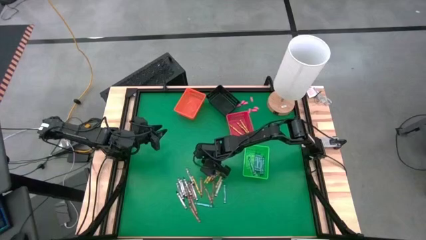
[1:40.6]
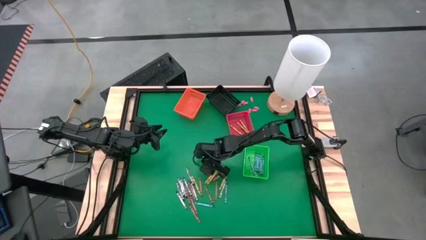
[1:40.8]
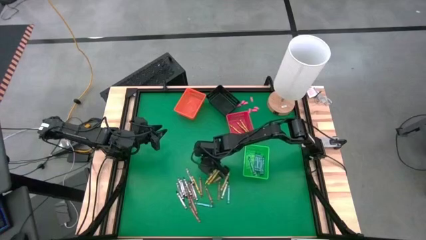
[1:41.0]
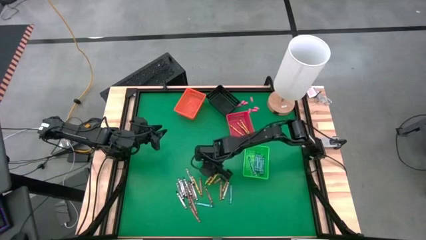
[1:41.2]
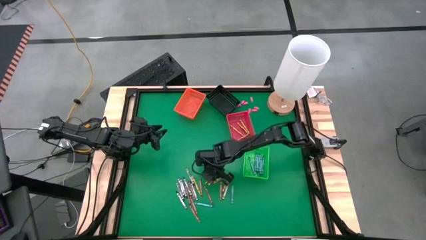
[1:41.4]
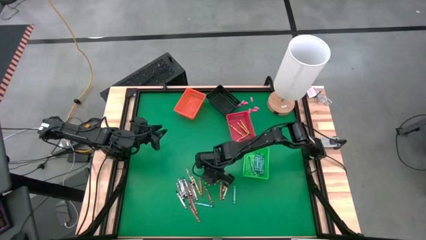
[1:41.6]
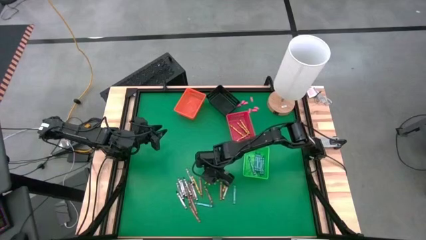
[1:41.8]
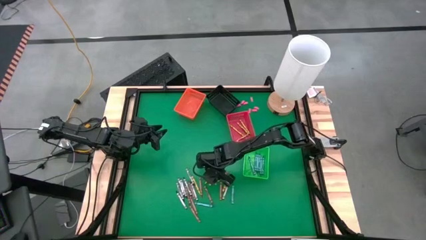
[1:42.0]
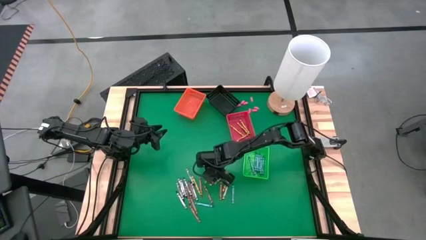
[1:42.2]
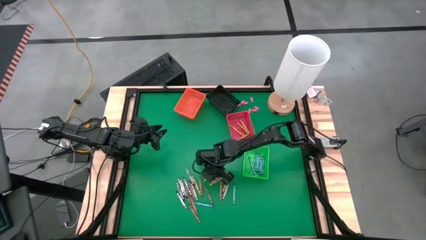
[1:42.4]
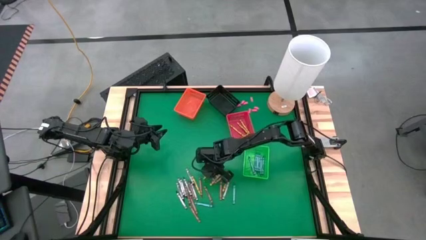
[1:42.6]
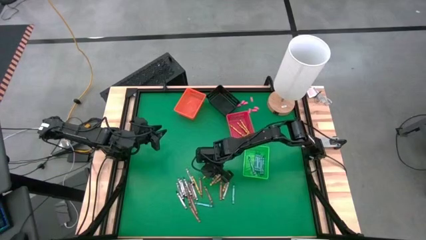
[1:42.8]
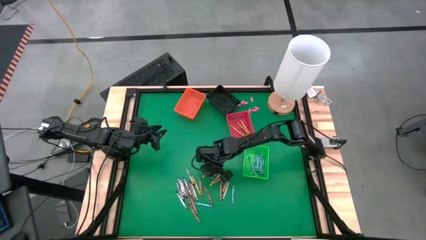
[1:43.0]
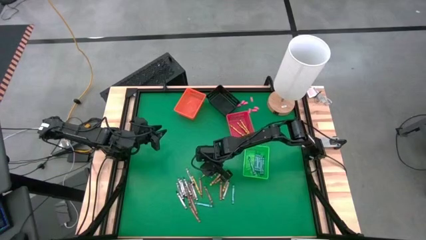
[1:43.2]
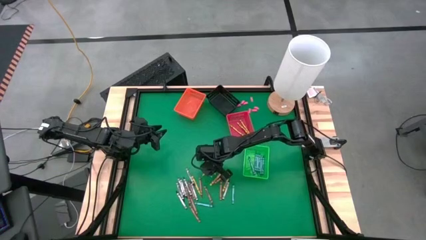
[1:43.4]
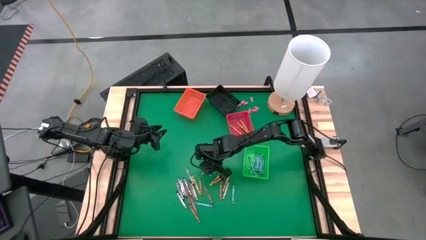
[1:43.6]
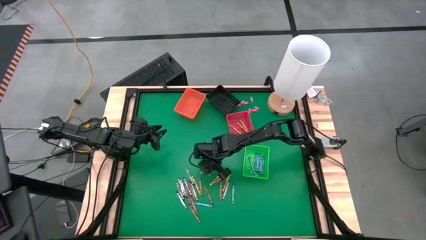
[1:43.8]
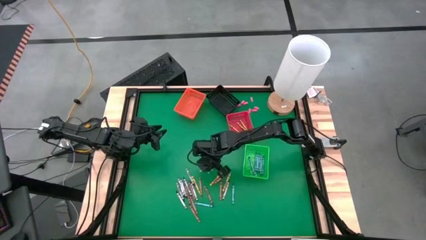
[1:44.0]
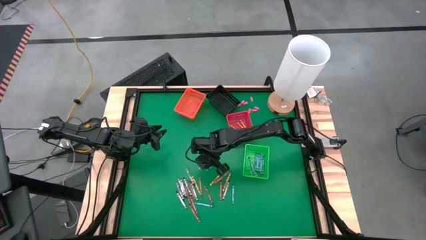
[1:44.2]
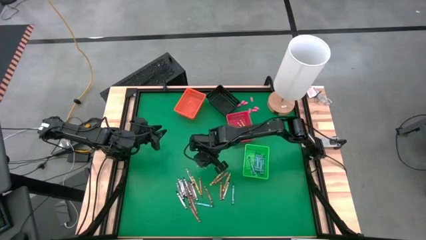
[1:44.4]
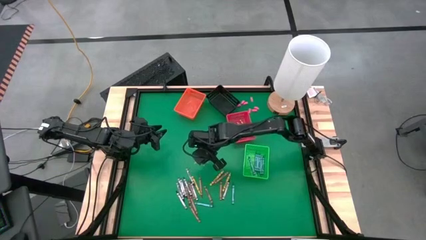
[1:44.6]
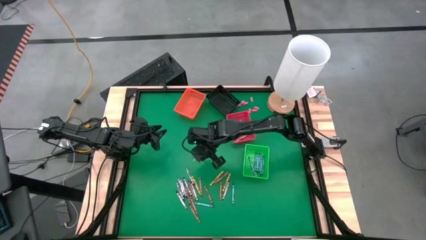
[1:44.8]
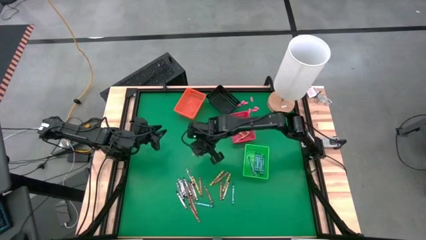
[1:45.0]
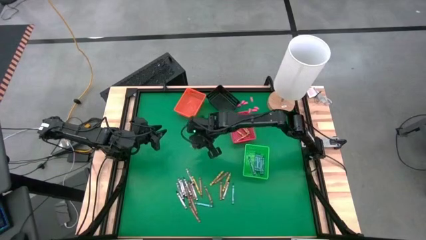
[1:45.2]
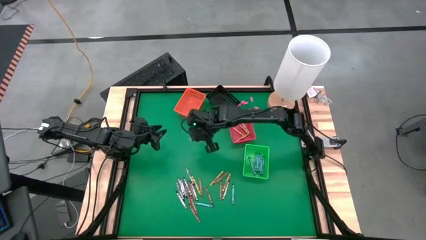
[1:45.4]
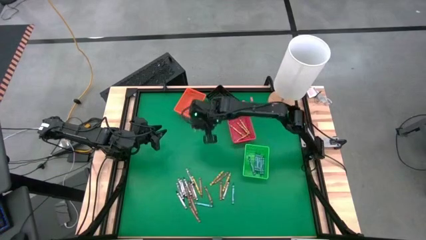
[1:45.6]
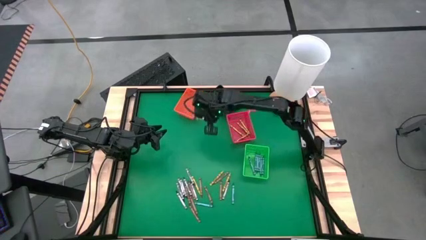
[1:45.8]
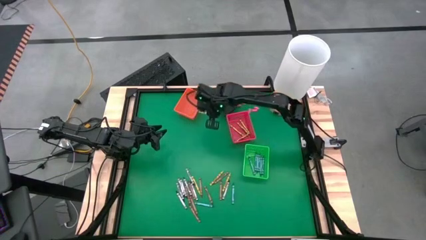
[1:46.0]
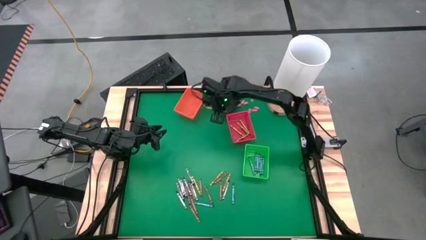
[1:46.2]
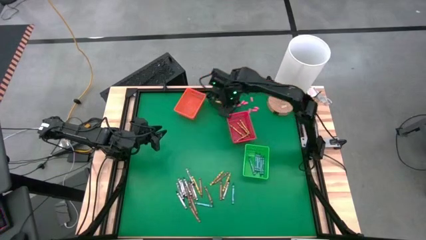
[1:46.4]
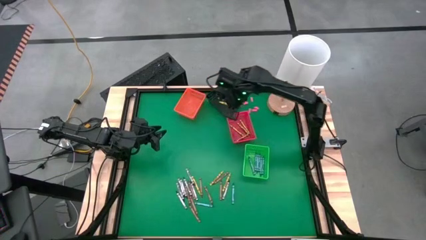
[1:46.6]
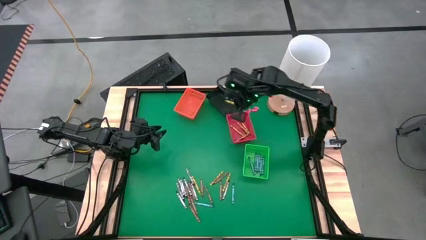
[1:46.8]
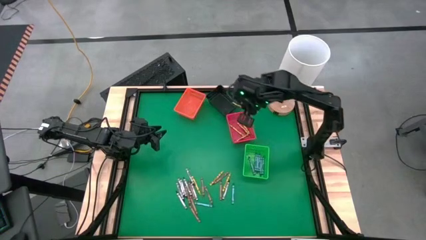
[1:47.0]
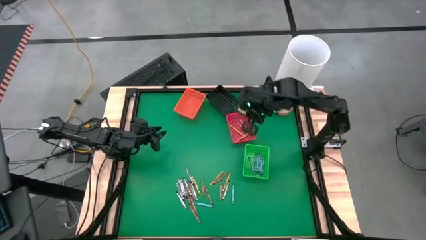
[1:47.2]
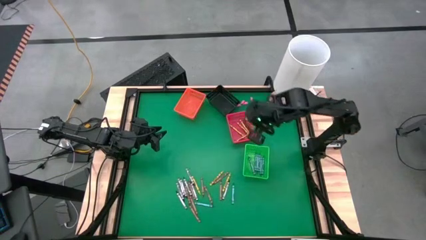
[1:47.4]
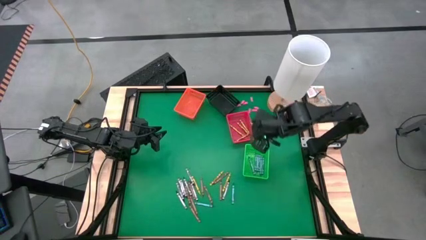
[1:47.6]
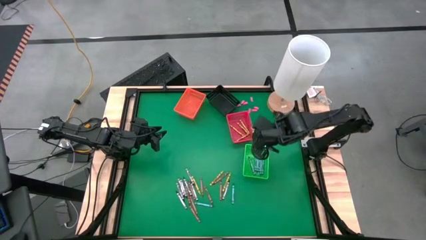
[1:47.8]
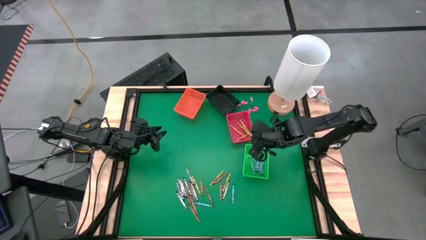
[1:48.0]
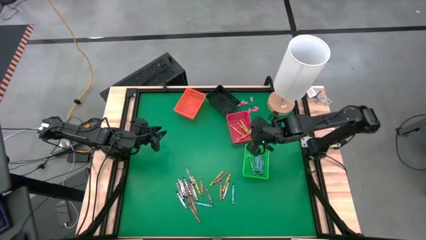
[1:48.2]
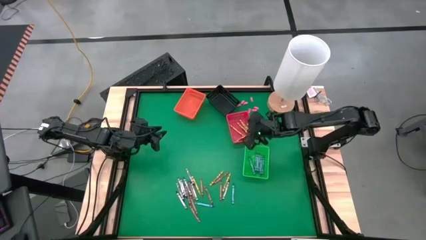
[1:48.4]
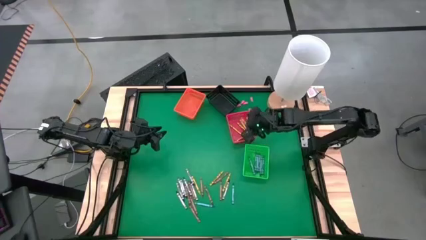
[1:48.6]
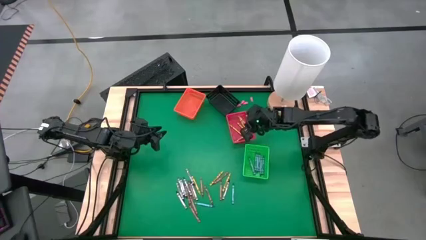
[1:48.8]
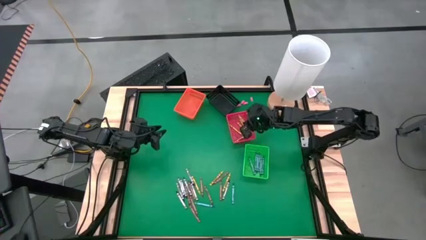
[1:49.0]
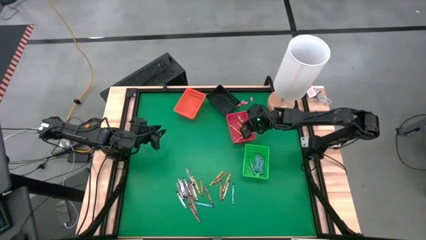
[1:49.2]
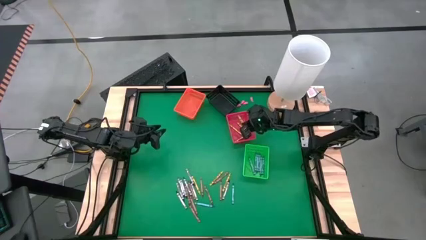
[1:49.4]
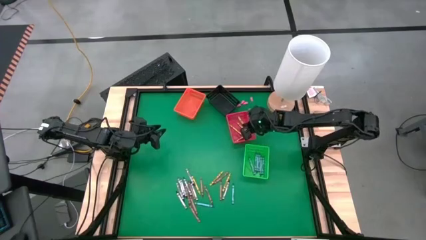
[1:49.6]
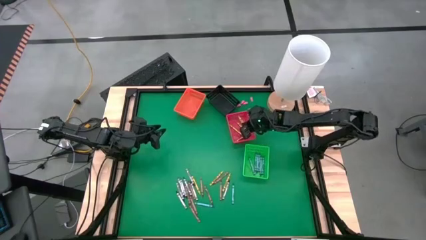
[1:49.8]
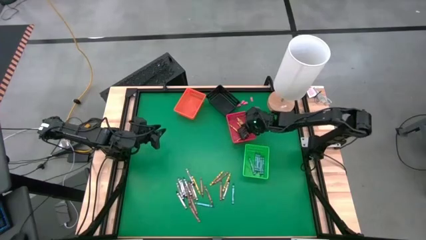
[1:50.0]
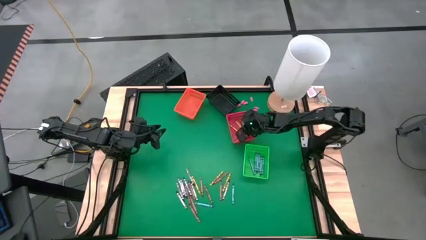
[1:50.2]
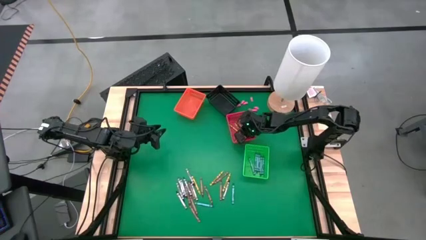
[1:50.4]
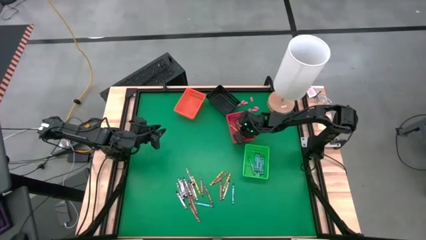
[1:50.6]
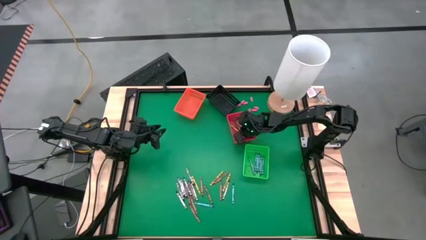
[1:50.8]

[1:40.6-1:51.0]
Task: Sort crayons
Put the yellow crayon into the red bin

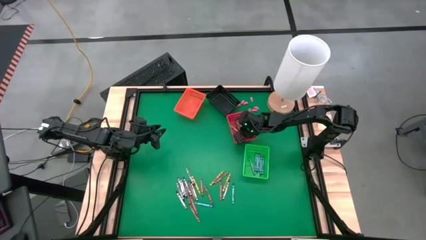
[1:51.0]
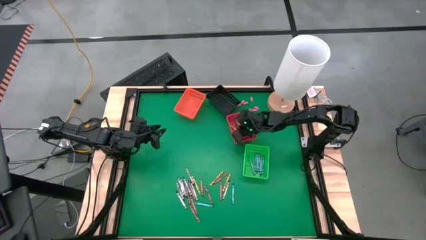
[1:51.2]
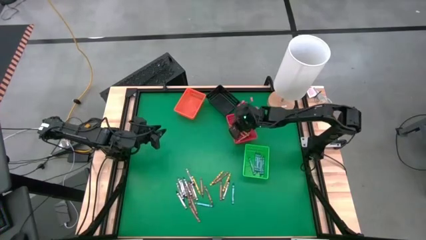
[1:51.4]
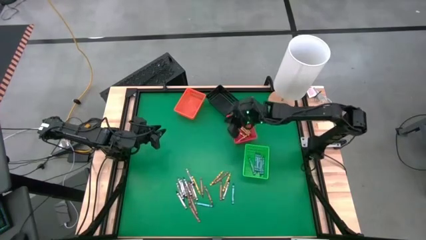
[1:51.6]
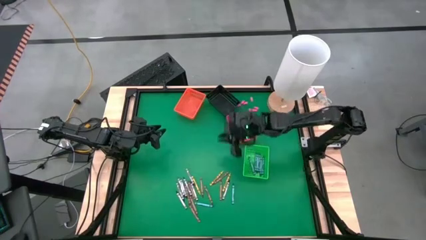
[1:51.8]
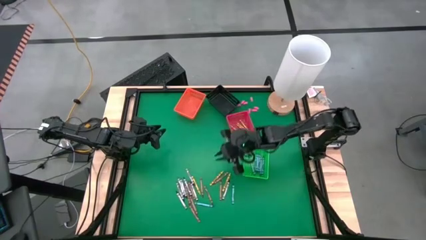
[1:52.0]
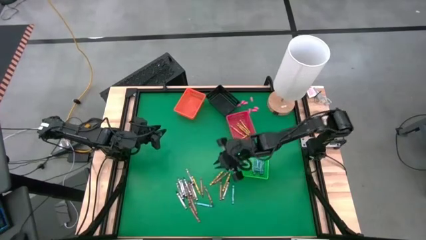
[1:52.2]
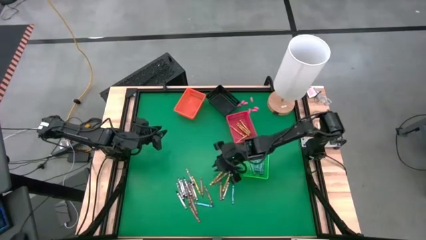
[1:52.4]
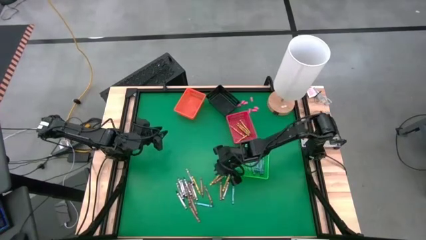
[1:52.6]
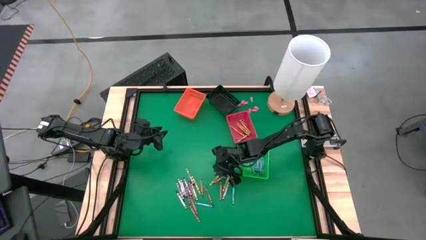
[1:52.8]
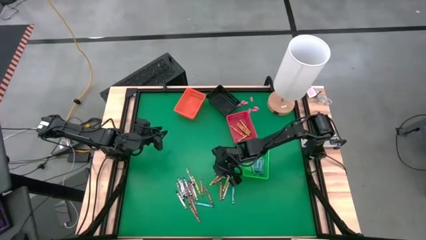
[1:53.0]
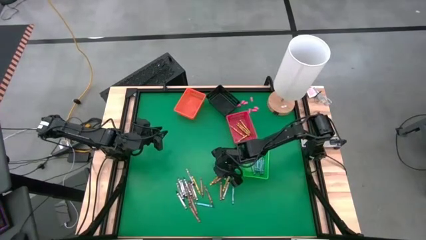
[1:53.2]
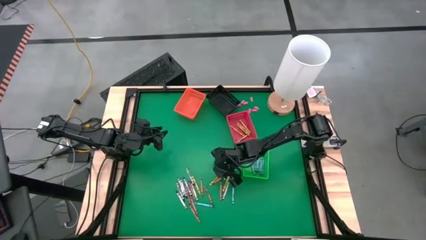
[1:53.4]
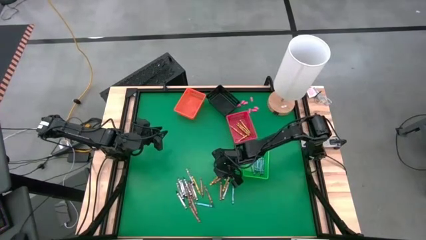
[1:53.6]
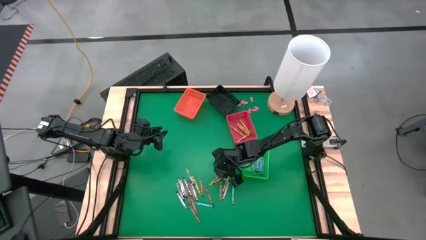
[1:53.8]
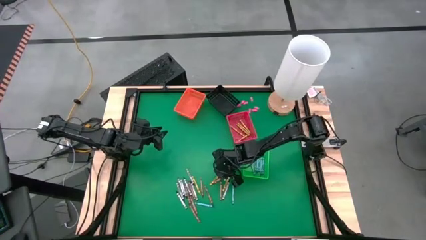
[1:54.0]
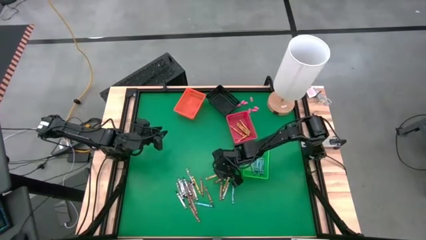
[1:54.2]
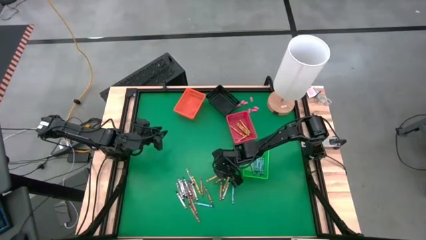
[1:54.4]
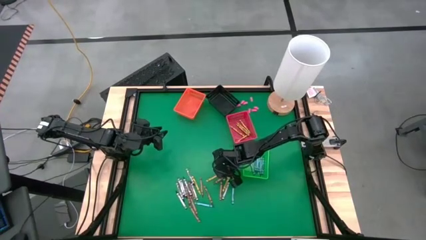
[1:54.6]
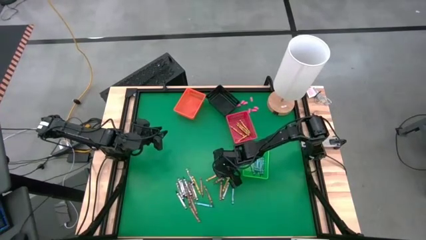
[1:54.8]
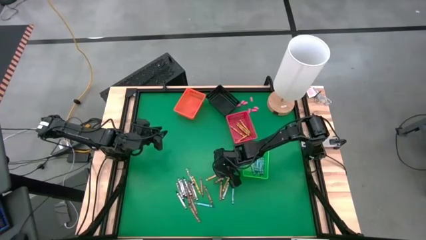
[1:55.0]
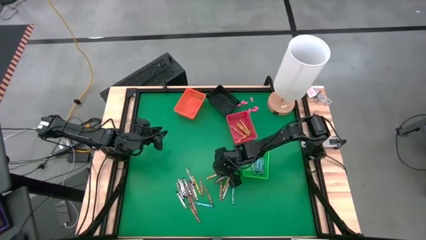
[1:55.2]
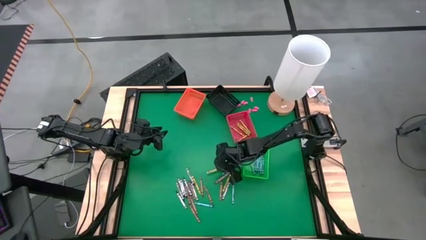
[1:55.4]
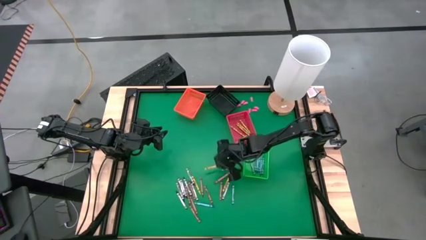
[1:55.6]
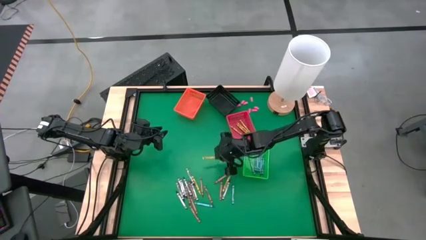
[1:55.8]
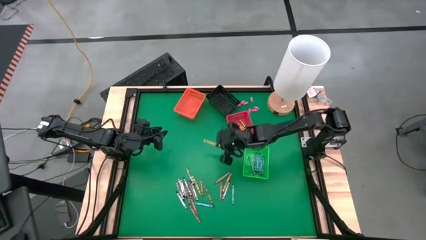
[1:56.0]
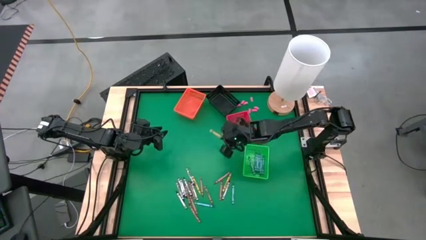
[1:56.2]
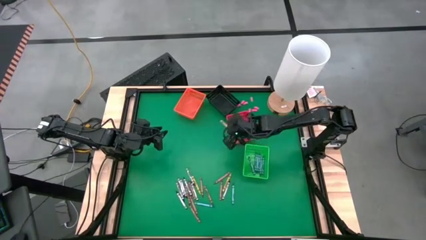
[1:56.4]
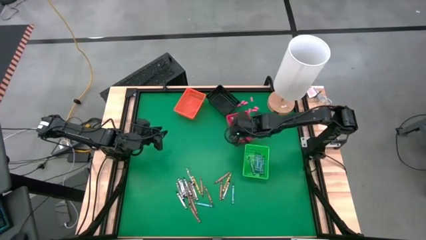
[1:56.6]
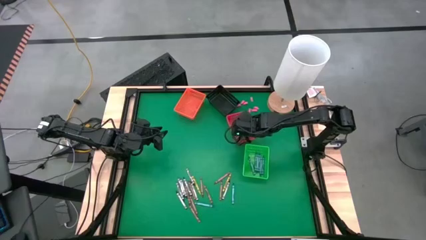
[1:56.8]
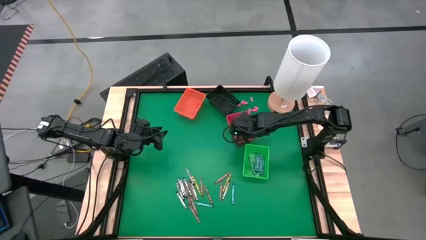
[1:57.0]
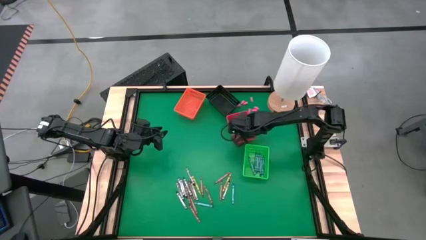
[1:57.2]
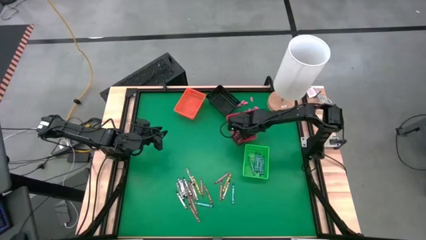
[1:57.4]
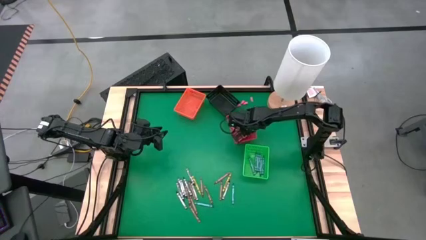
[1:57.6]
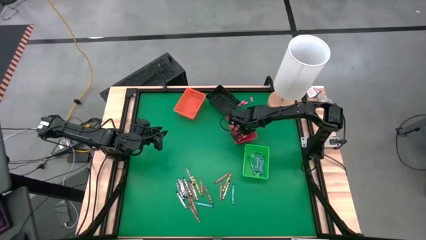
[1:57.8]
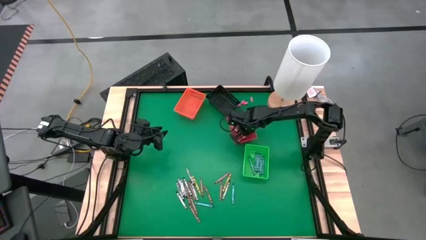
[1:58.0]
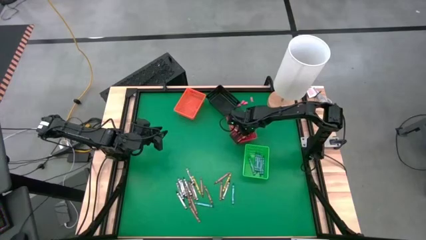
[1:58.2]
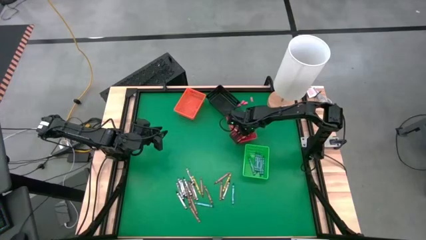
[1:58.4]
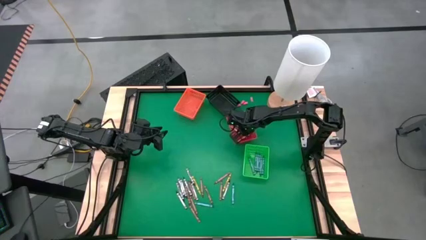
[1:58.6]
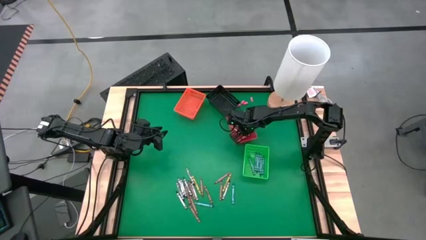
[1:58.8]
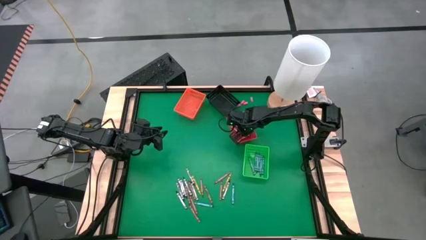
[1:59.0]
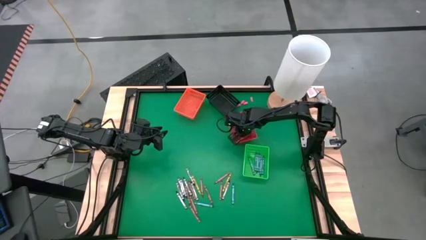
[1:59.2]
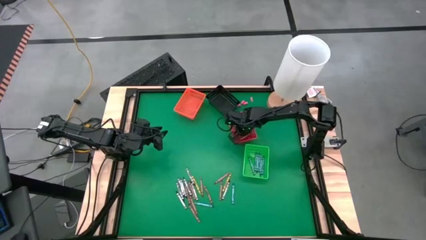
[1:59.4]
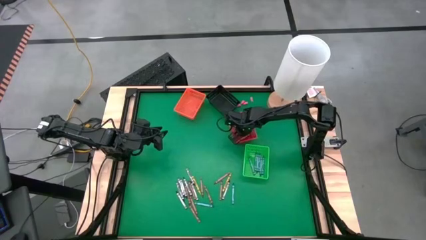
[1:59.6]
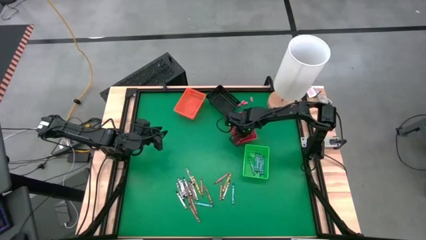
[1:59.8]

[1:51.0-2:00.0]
Put the yellow crayon into the red bin
